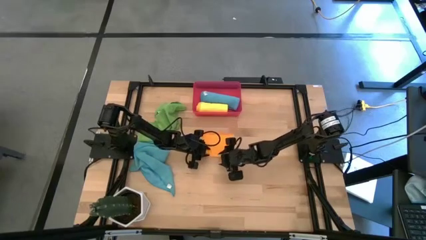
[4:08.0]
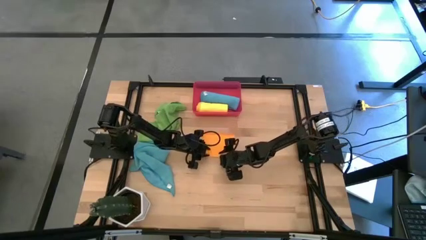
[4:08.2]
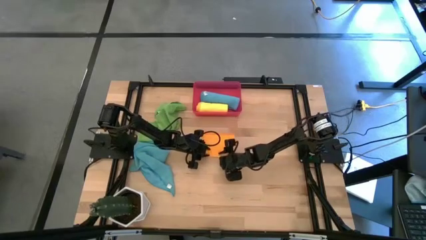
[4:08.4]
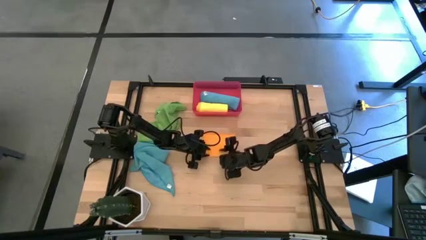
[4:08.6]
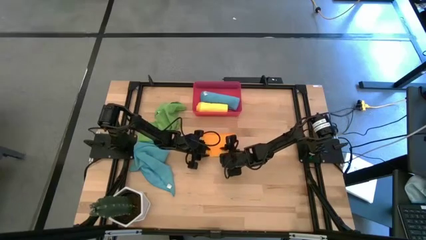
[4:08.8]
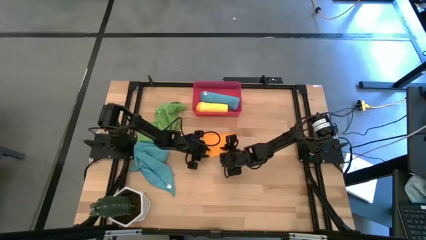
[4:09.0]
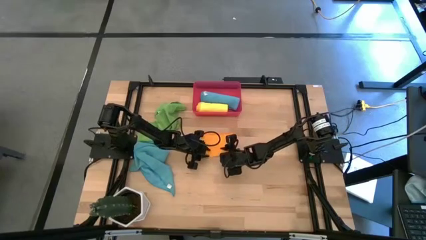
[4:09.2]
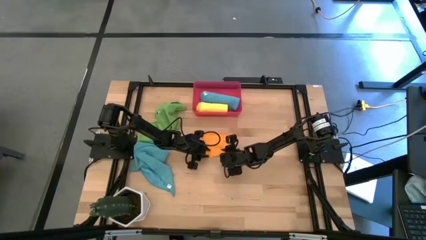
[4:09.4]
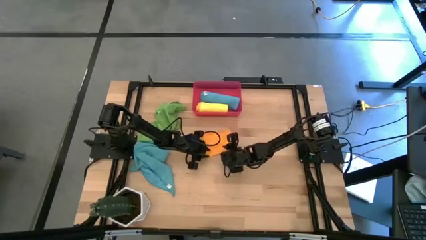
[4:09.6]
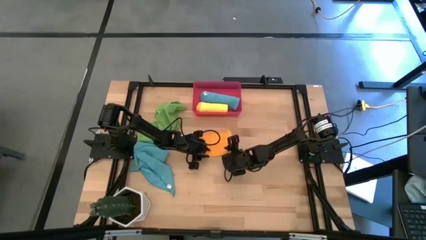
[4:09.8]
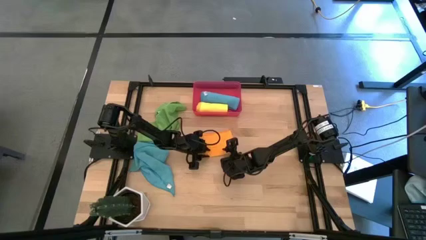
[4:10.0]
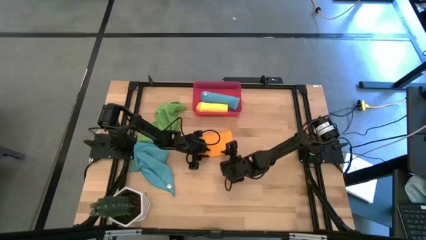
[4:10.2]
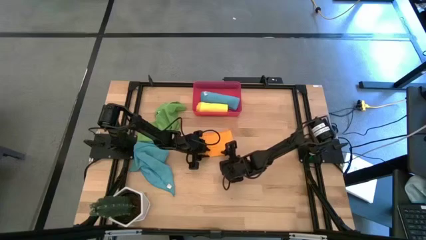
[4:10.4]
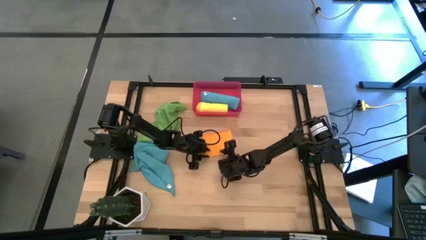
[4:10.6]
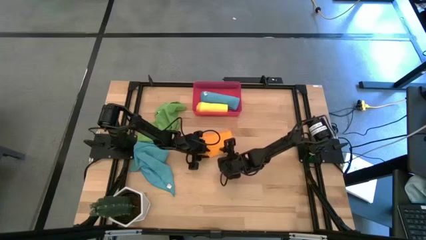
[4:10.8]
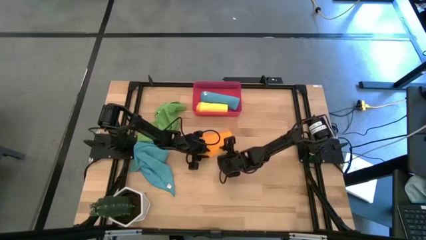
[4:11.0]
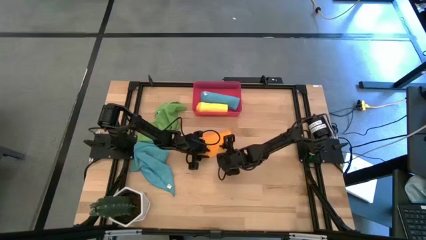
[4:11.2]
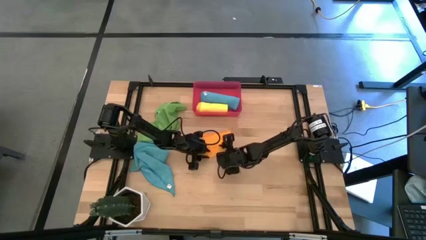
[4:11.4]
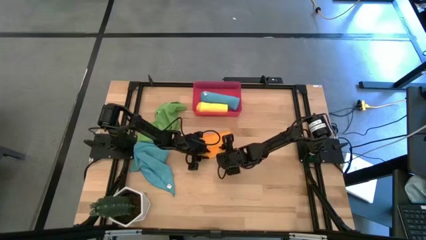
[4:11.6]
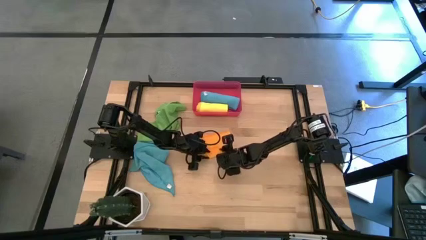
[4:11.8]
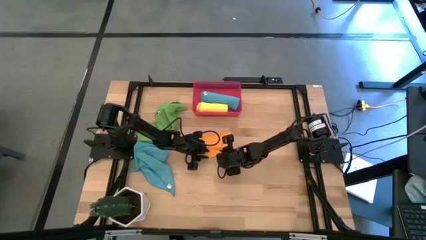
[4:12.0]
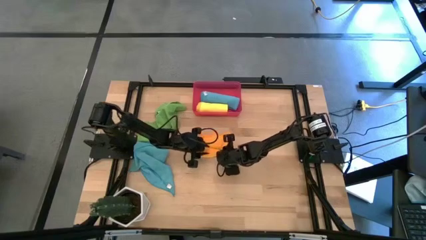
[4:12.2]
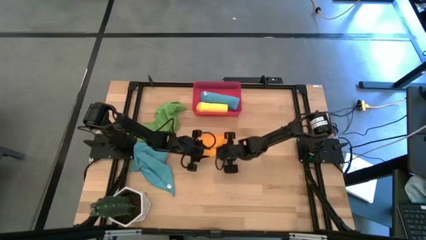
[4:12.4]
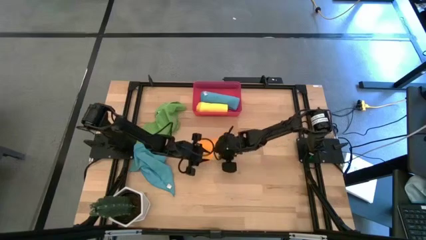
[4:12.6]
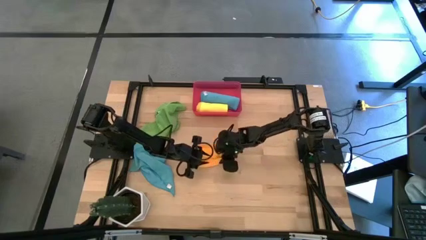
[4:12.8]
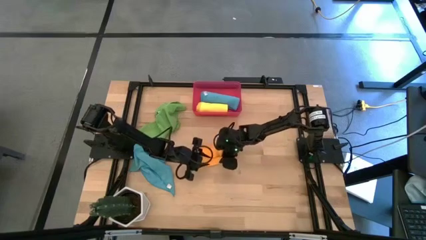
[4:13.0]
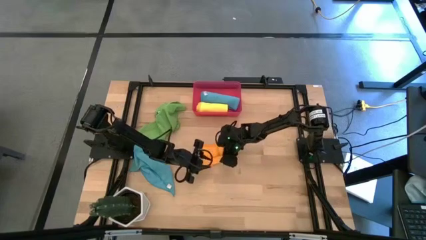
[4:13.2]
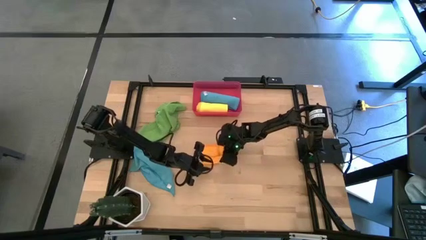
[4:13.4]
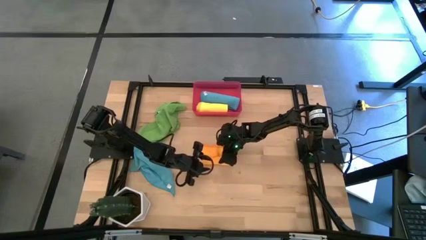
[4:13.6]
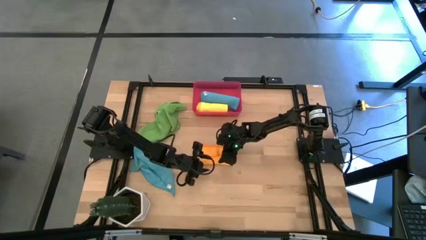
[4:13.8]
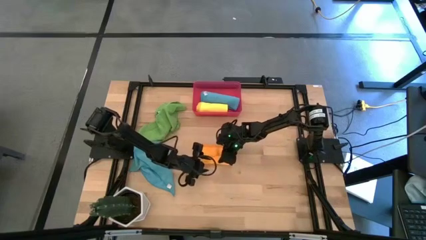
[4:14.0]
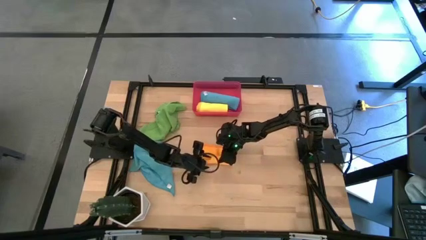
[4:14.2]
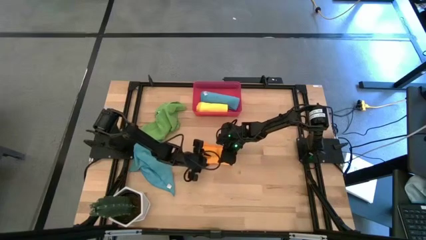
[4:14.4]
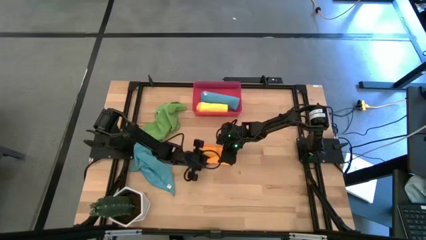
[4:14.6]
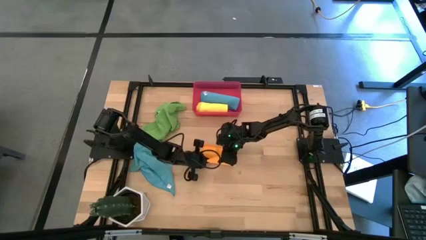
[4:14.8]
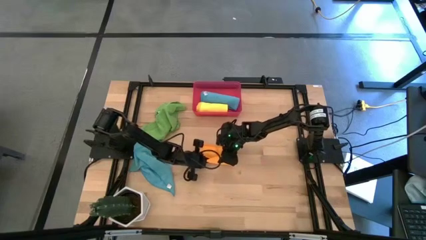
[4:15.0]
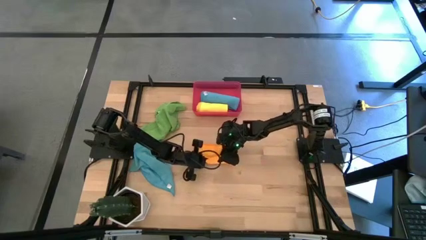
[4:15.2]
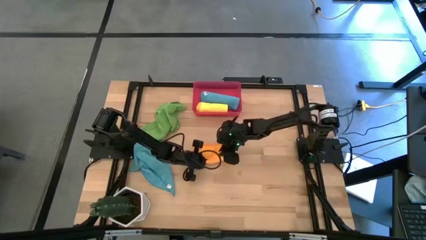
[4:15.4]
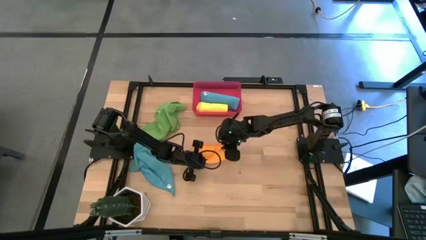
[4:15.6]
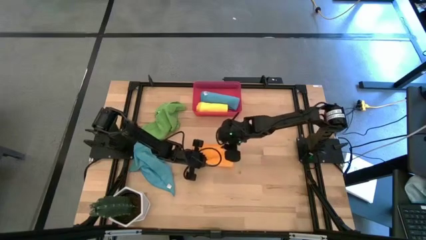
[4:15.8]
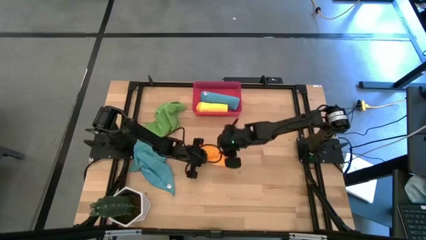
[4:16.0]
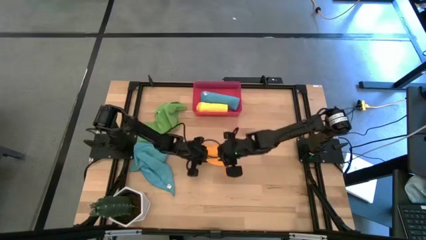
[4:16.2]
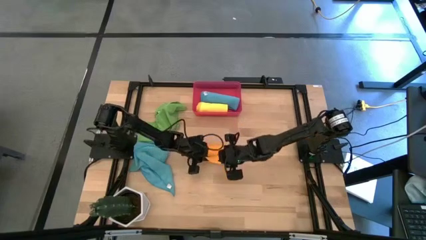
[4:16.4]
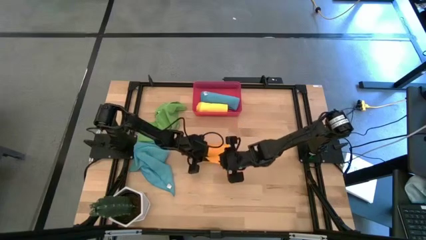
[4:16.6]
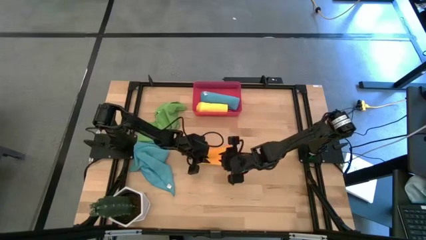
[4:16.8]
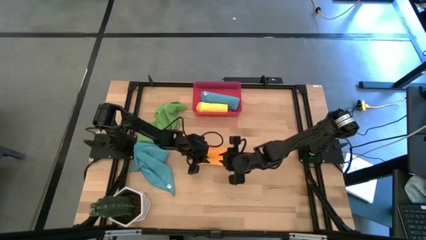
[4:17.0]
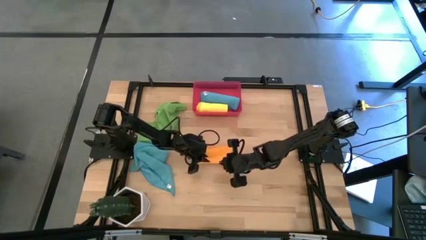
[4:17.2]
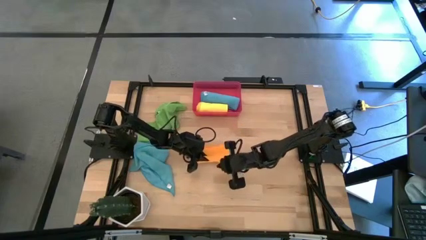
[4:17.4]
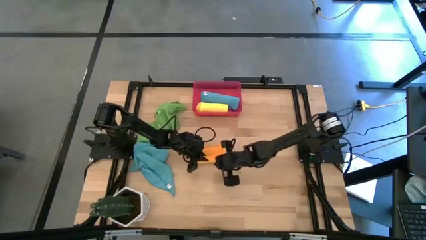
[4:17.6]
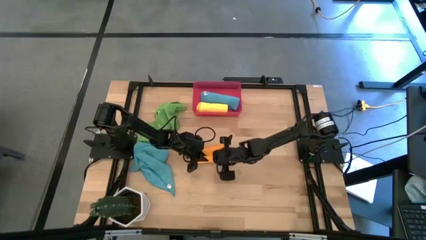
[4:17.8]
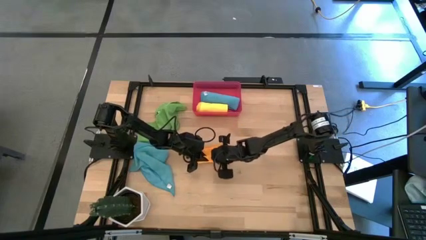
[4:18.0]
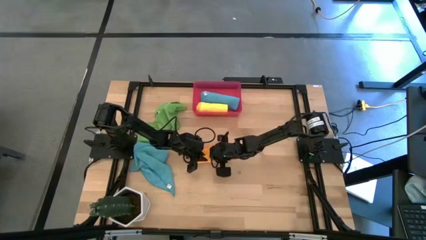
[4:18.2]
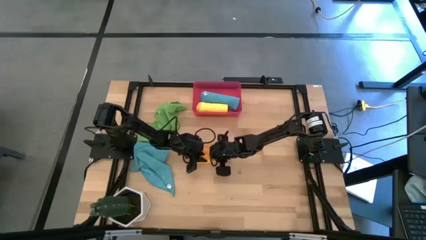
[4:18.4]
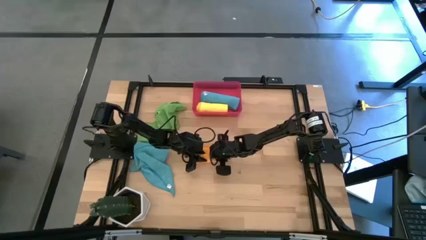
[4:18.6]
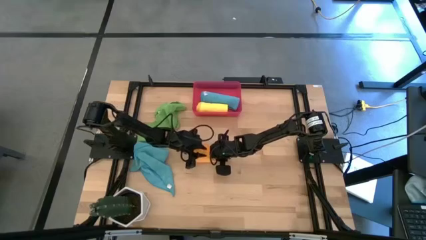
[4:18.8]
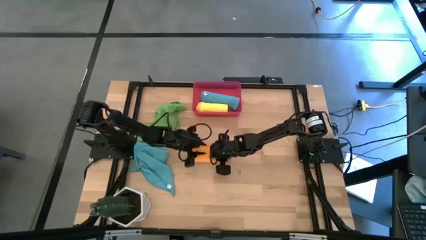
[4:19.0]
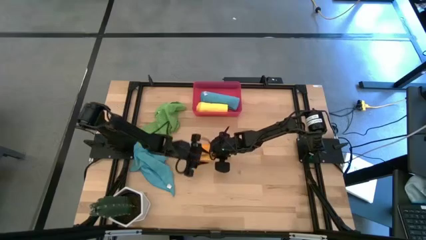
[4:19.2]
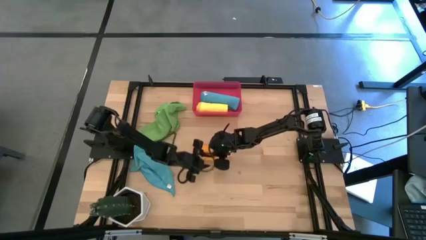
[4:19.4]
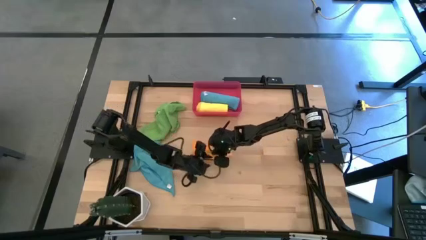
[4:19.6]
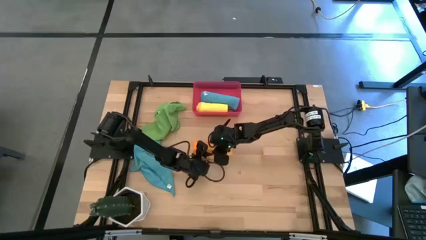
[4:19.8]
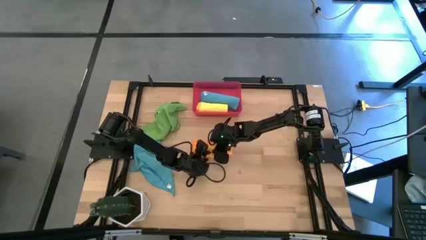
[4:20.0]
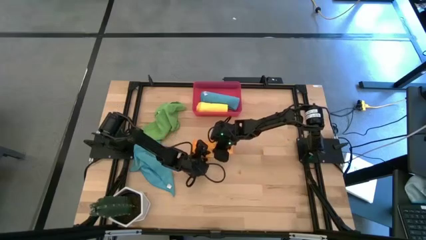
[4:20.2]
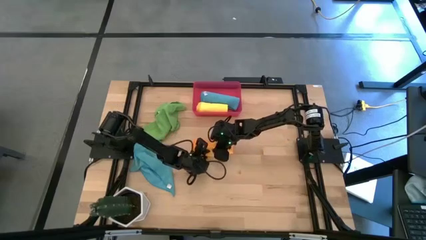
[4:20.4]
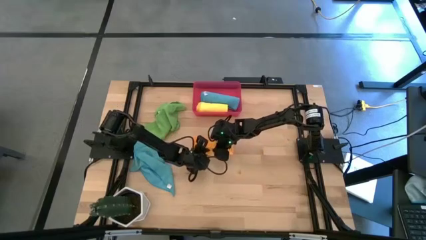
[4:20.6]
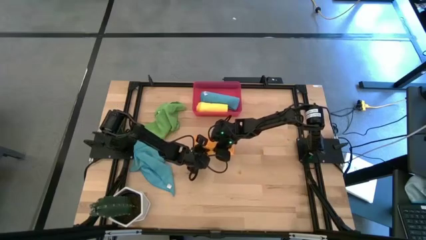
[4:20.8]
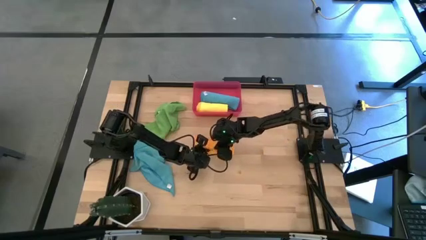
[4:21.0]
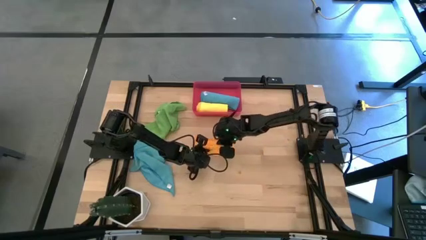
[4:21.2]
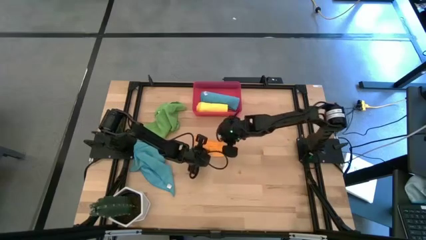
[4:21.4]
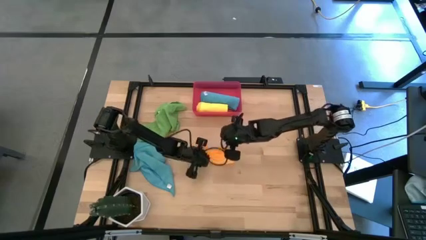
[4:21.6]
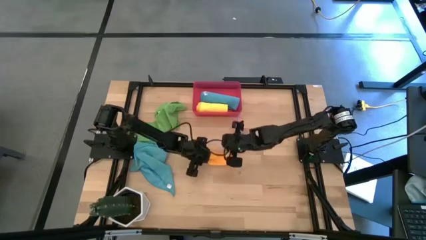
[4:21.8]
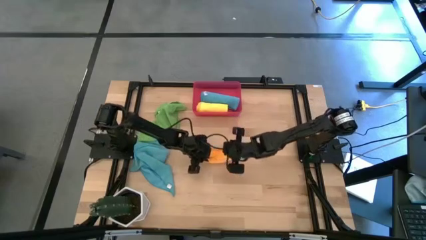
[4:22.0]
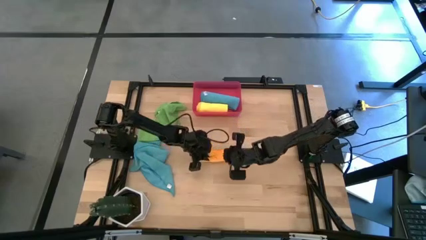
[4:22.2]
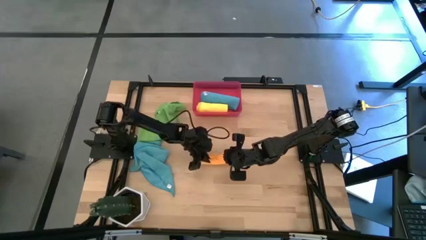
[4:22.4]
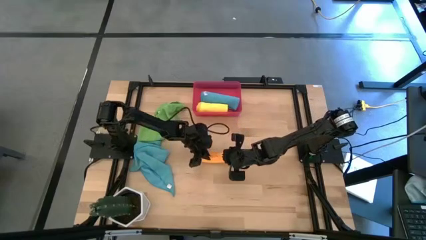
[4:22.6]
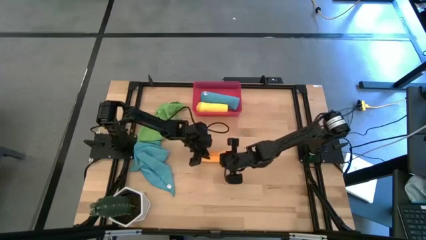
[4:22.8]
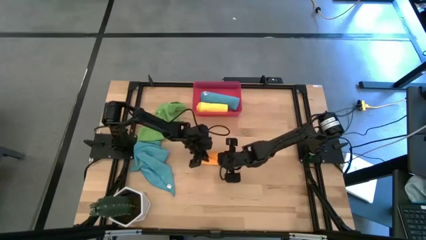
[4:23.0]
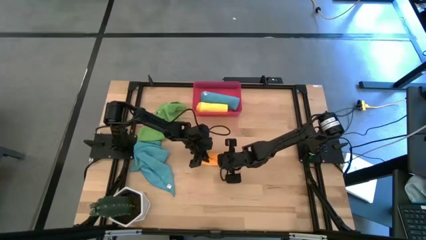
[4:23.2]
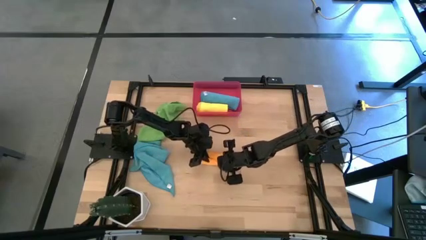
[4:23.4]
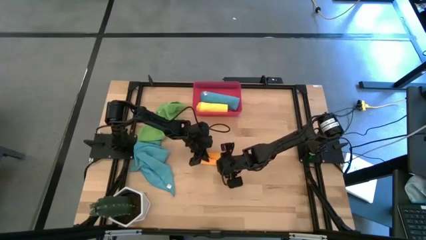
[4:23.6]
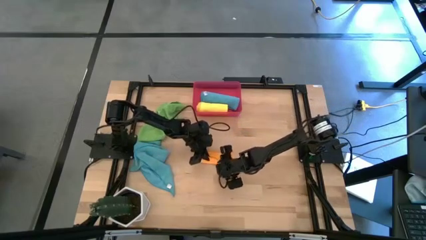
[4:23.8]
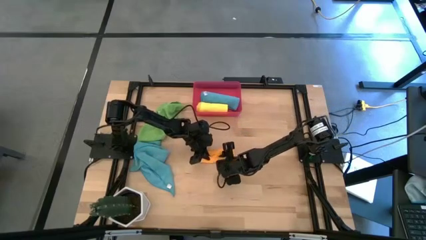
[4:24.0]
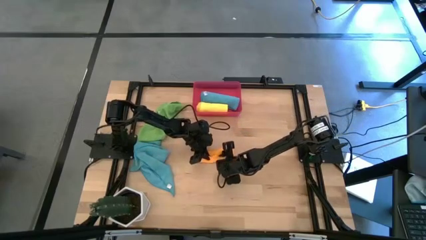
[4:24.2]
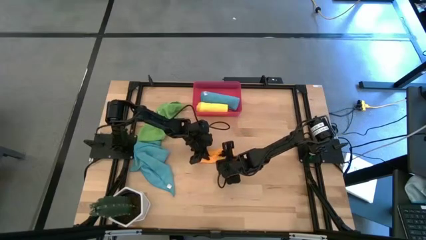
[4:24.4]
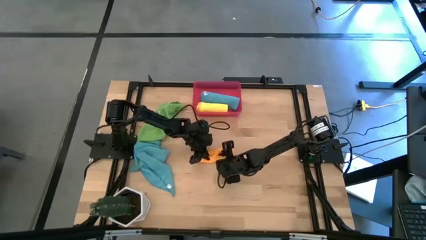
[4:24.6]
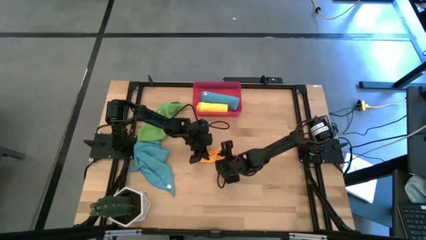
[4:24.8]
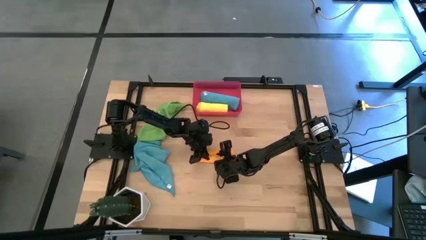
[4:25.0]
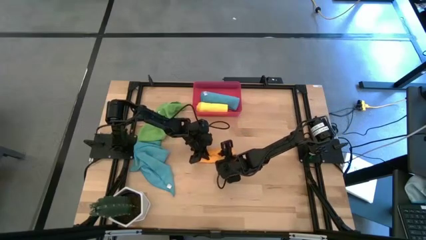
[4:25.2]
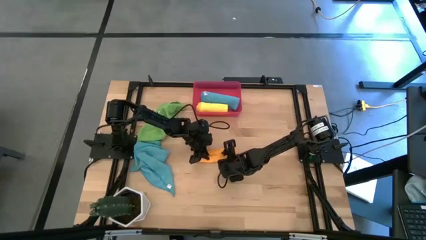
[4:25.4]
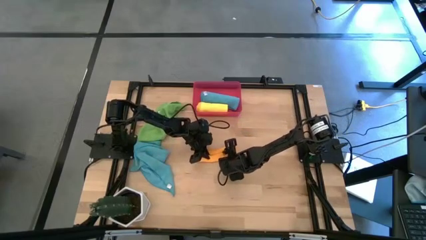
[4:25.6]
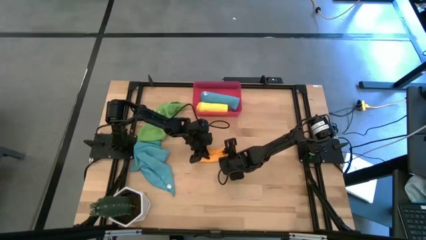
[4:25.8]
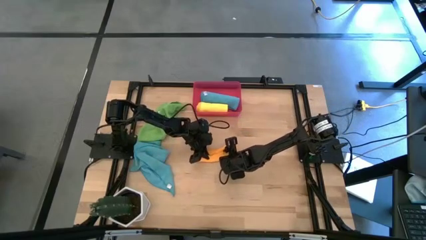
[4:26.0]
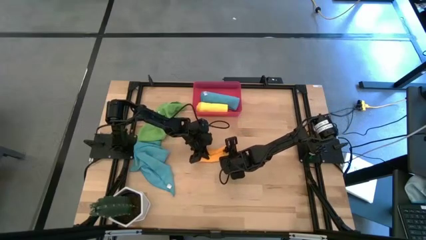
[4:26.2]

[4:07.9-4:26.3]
Task: Roll microfiber towels into tight, uniform cylinder then place into a basket
Roll the orange microfiber cloth
